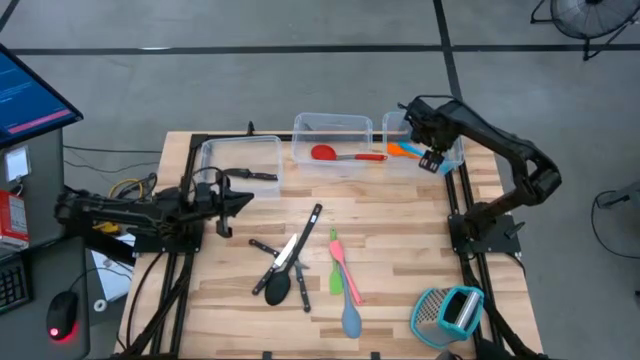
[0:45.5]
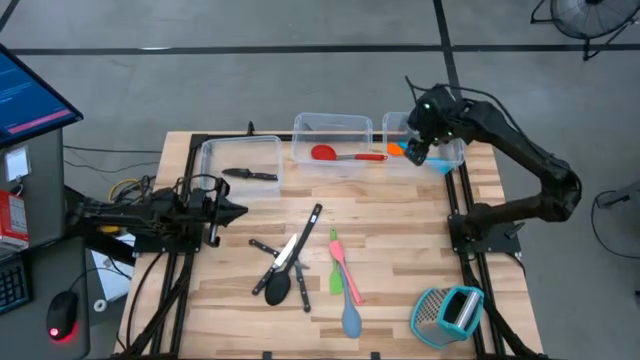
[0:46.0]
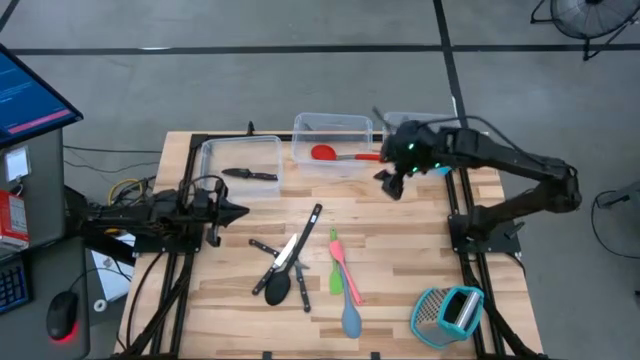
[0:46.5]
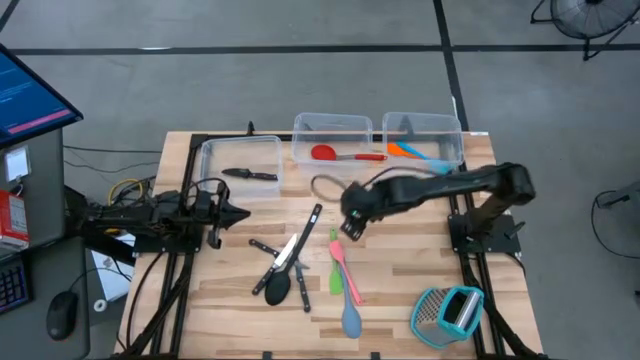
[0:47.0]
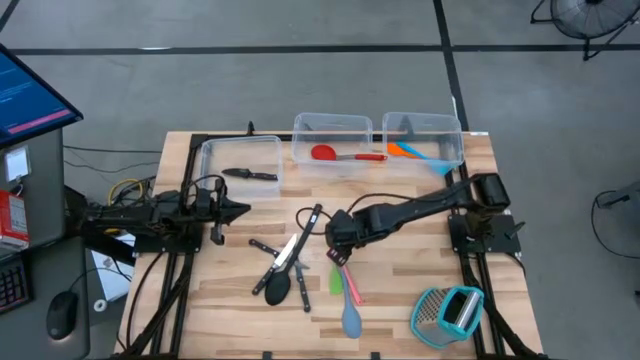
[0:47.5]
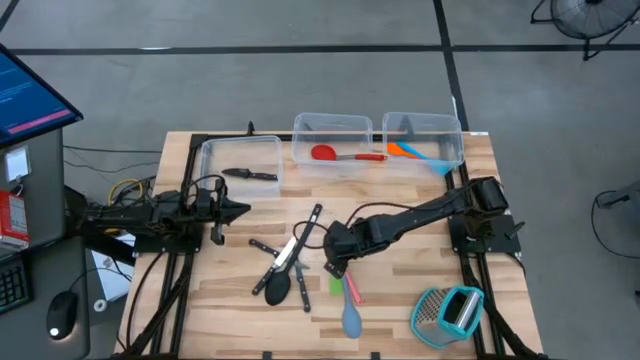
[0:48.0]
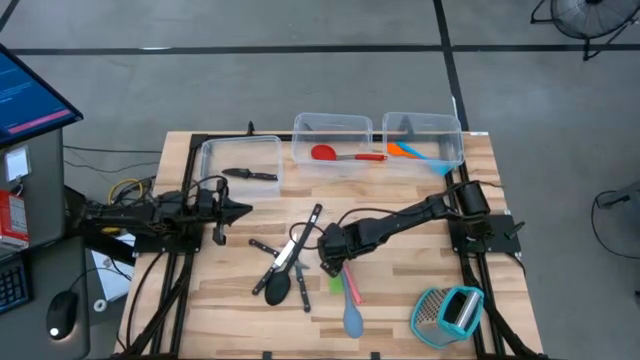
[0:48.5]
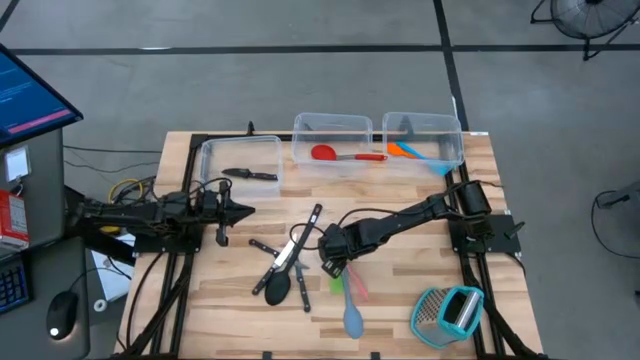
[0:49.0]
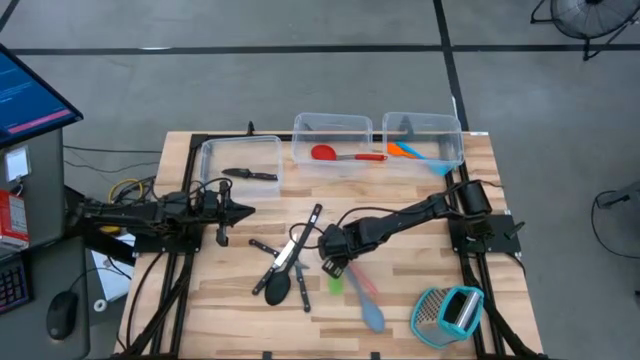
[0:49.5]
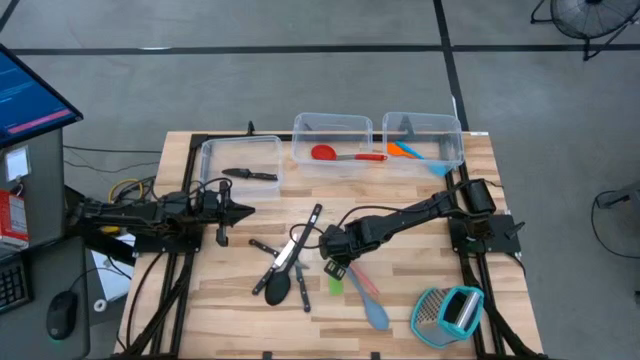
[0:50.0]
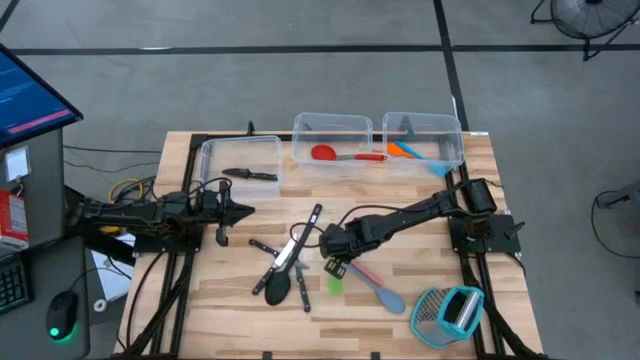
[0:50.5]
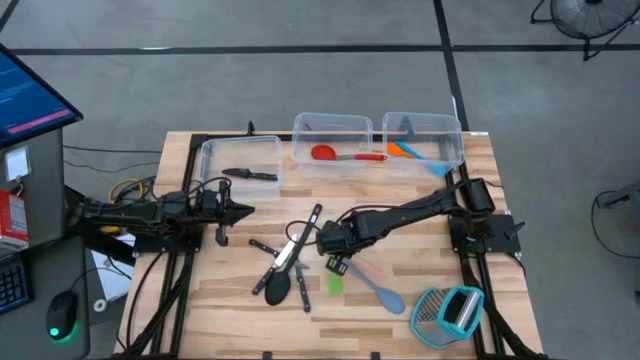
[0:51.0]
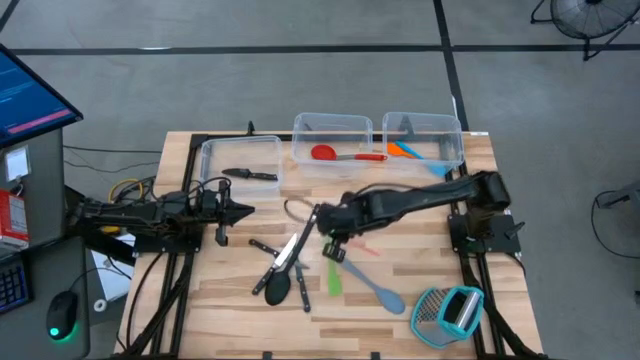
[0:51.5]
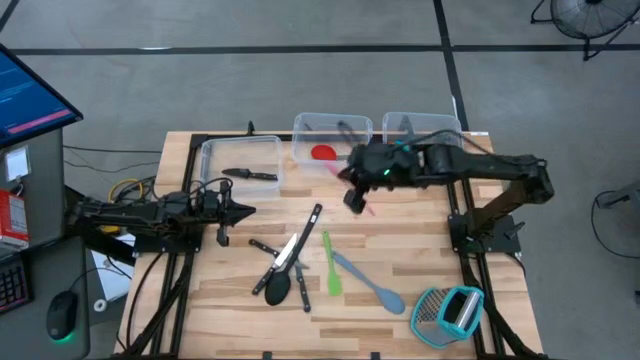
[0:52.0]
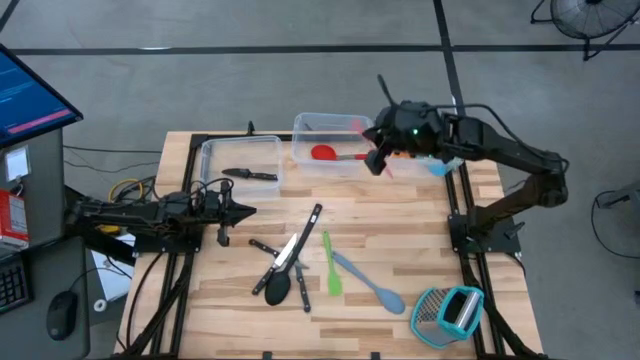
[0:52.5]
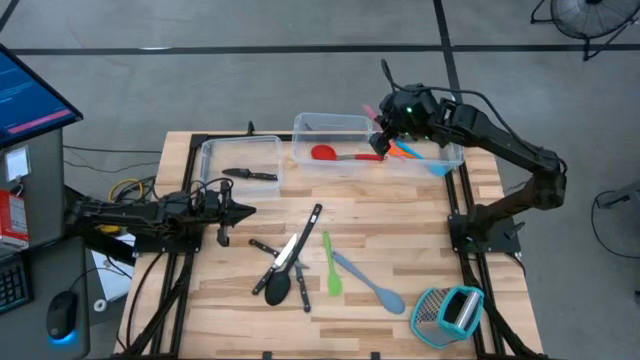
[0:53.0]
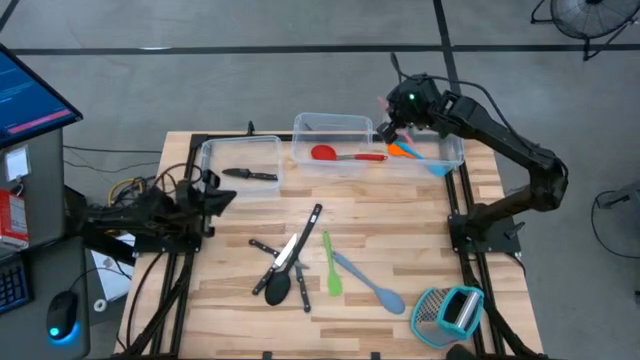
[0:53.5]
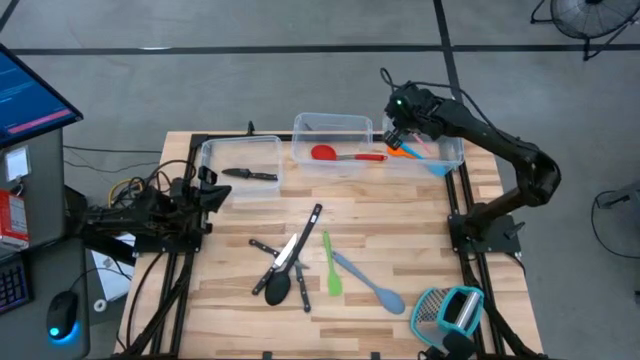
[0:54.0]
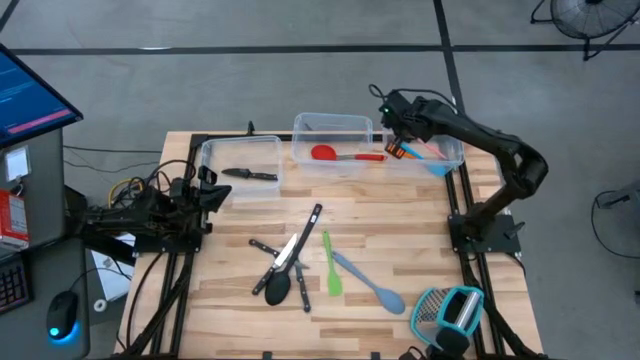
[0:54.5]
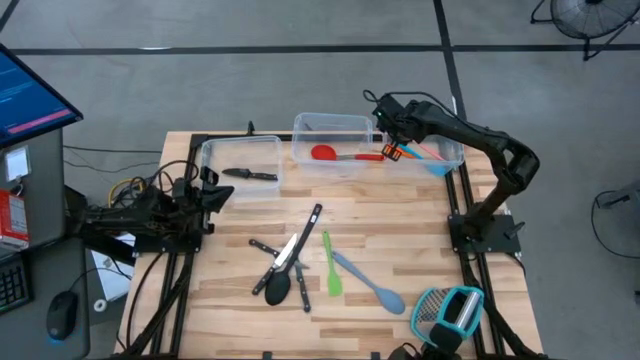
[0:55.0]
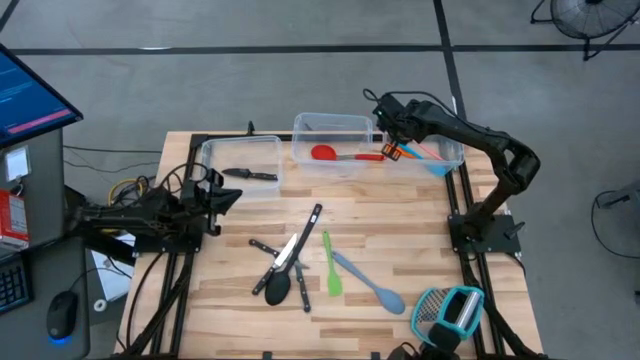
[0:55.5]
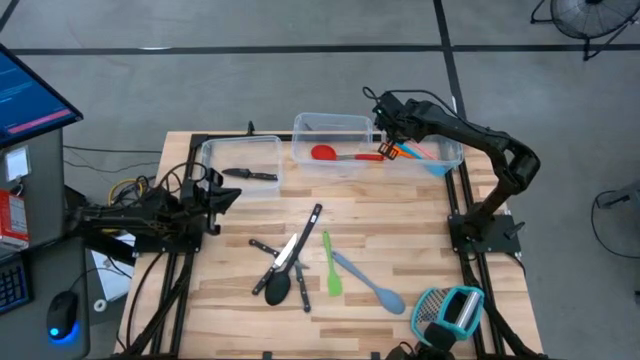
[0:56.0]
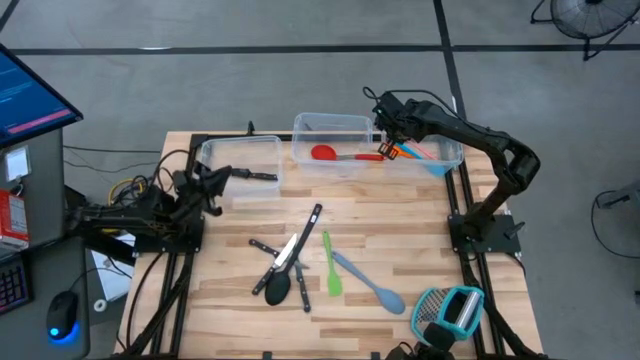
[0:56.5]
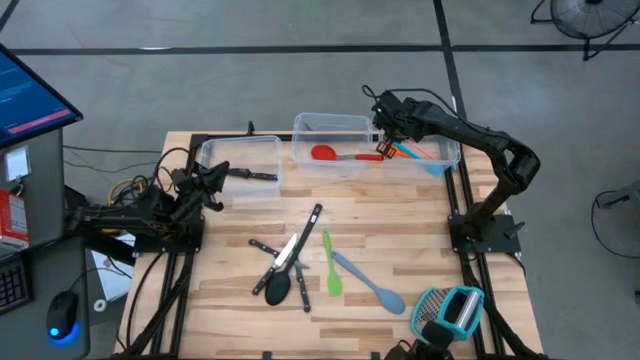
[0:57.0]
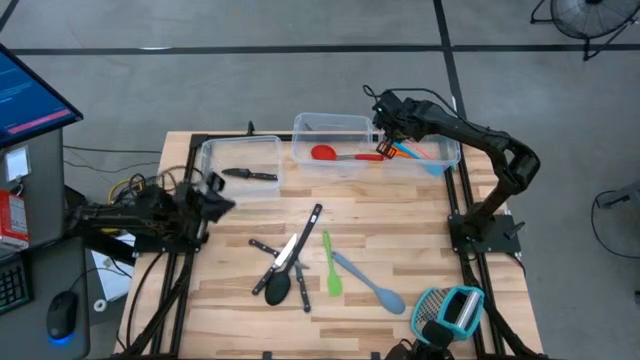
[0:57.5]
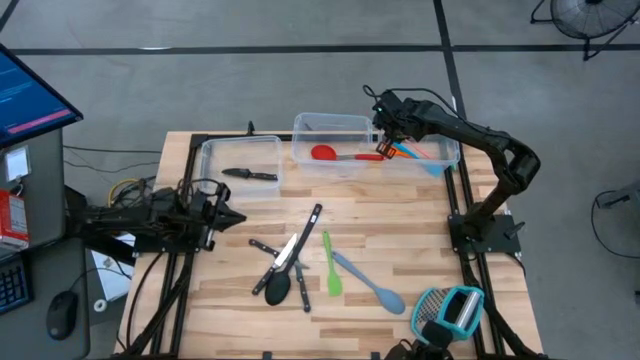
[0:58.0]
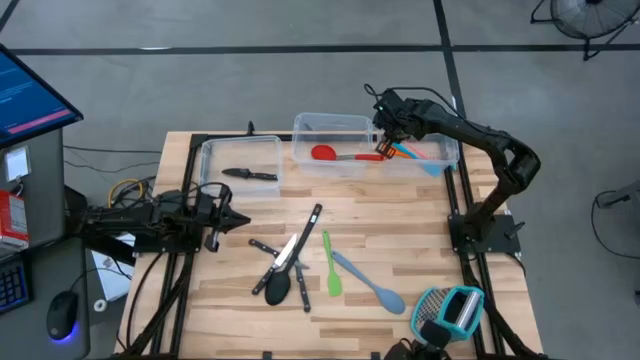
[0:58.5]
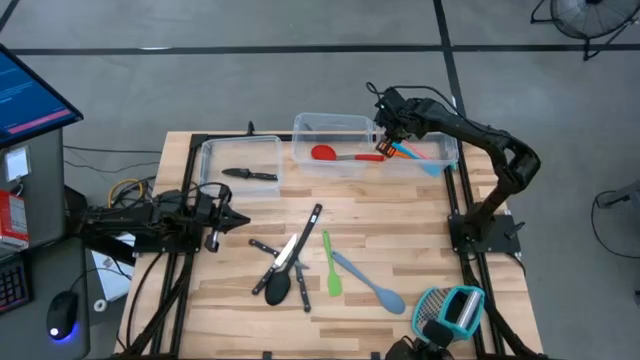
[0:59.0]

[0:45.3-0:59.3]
Task: Pick & Place Kitchen Items
Put the pink spatula into the top right transparent bin

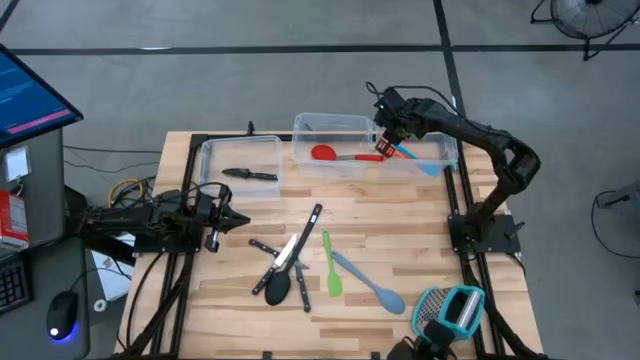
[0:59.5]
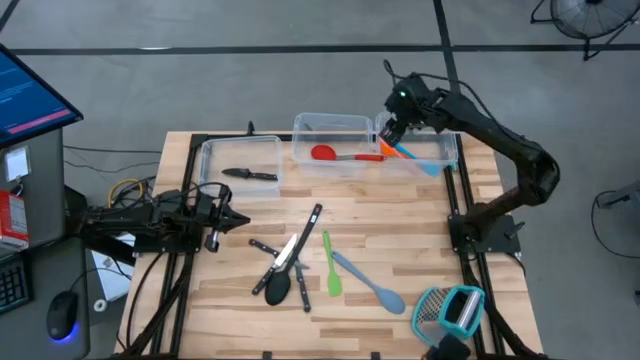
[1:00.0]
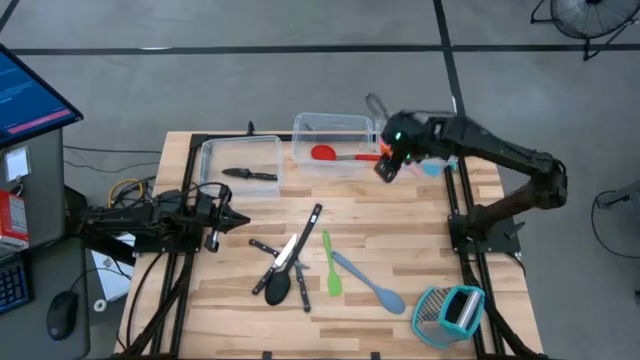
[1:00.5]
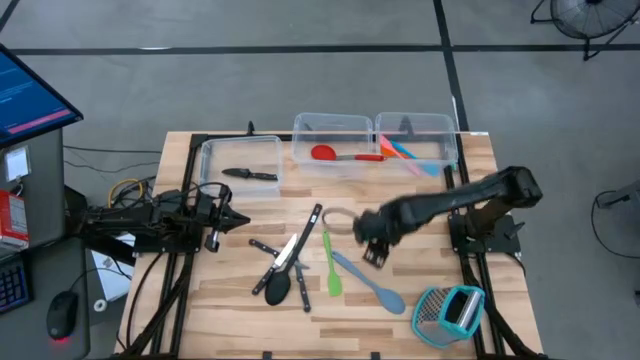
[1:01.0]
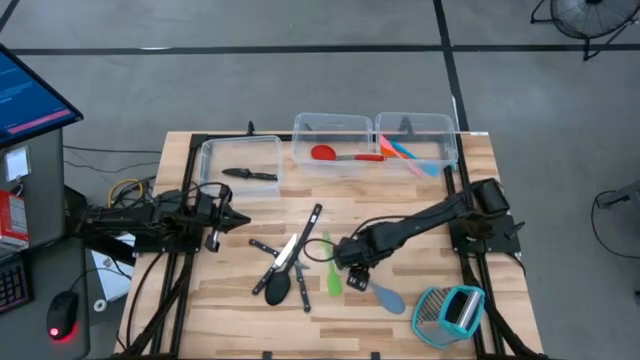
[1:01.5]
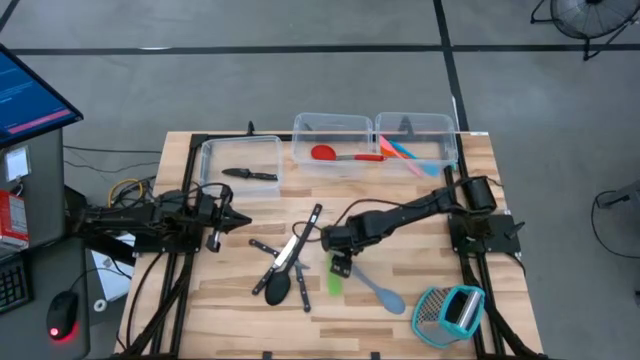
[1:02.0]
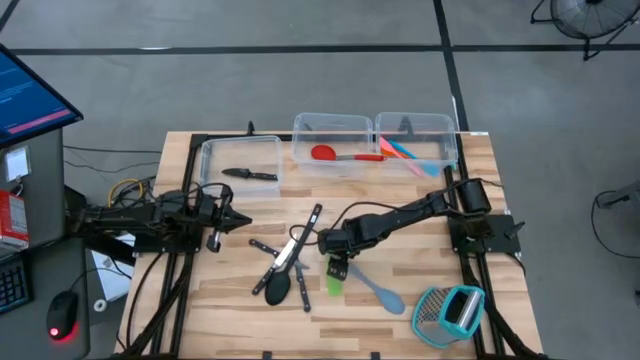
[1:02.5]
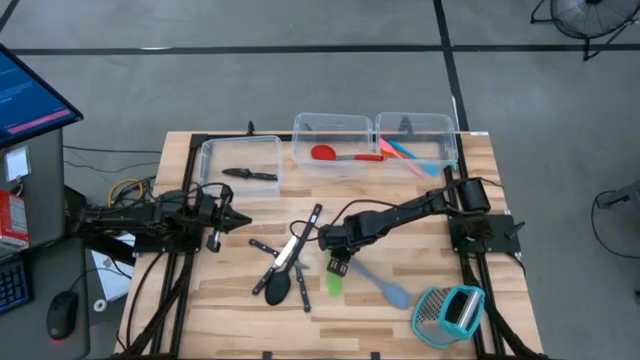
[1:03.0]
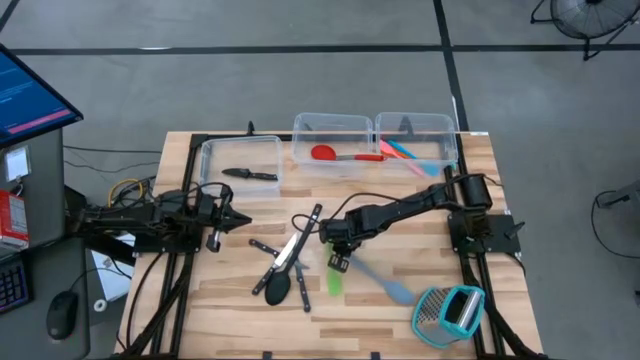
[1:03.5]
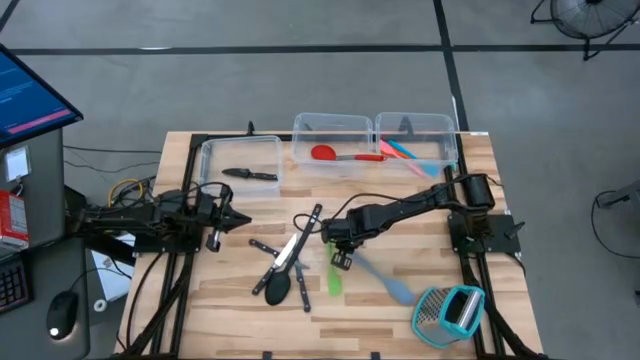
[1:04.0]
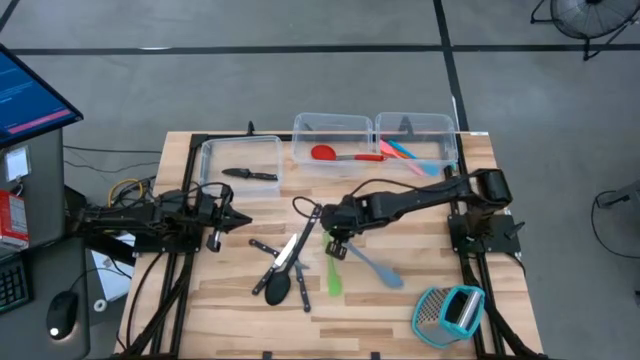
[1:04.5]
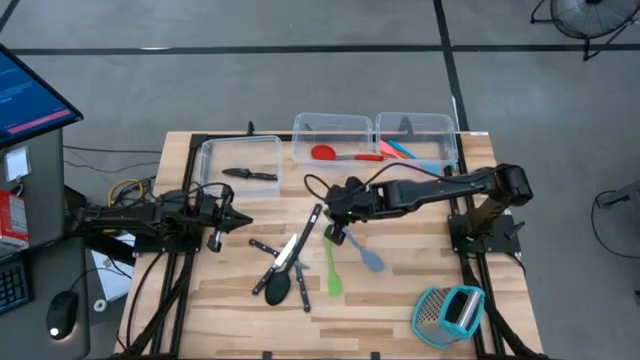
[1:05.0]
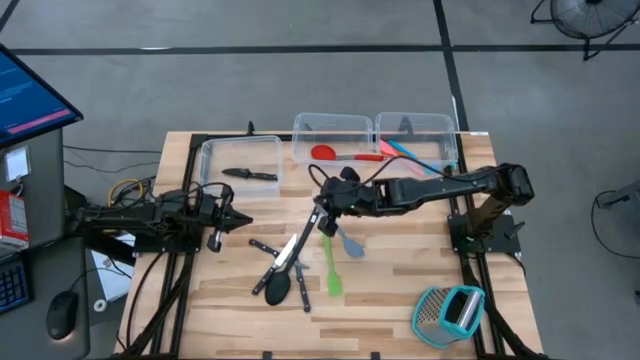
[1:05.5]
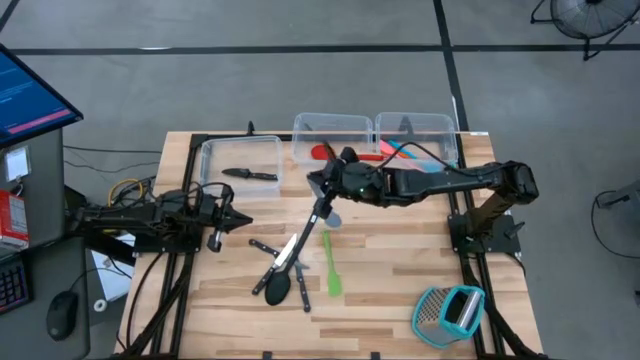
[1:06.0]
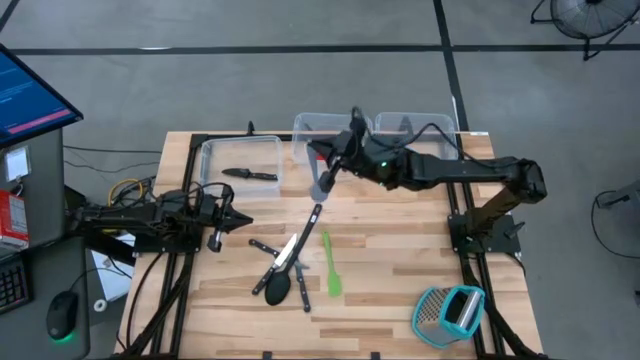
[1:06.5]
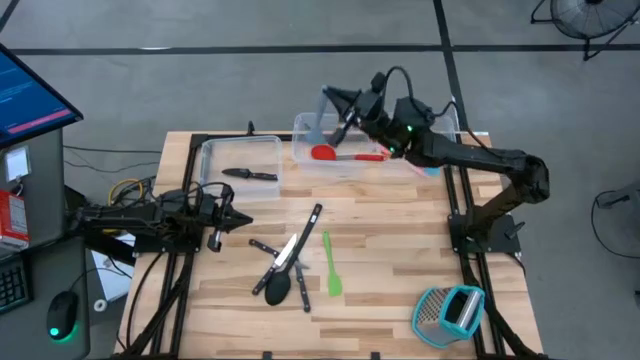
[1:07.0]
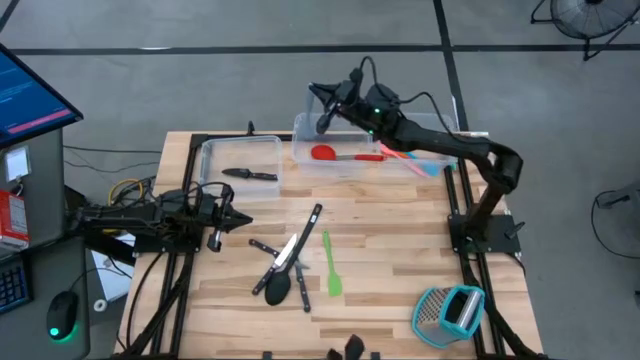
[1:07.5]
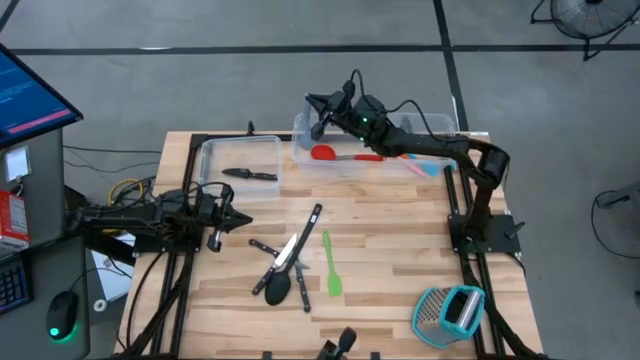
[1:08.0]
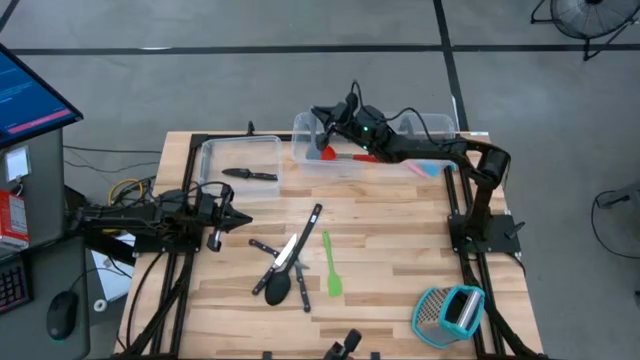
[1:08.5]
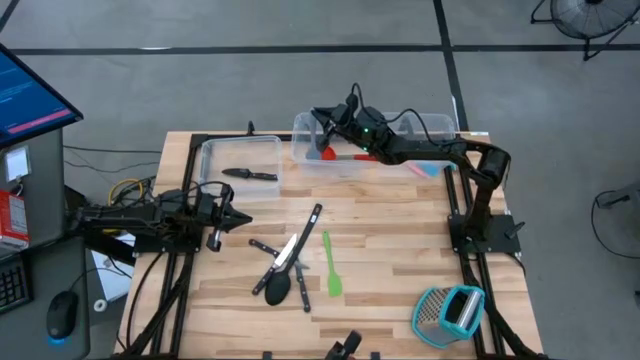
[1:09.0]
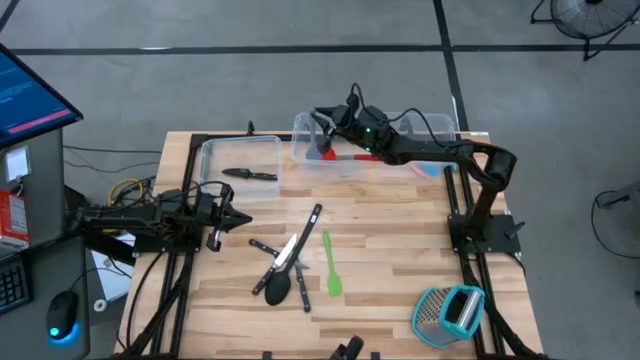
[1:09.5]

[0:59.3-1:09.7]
Put the blue serving spoon into the top middle transparent bin
